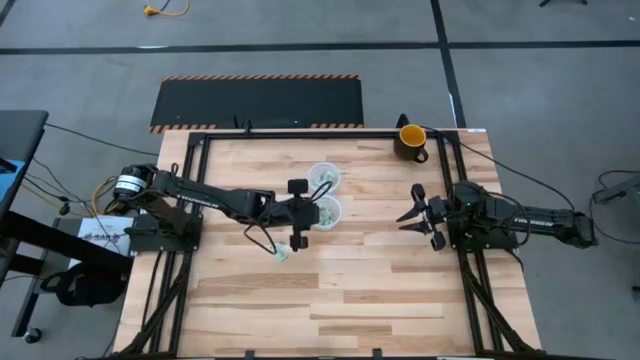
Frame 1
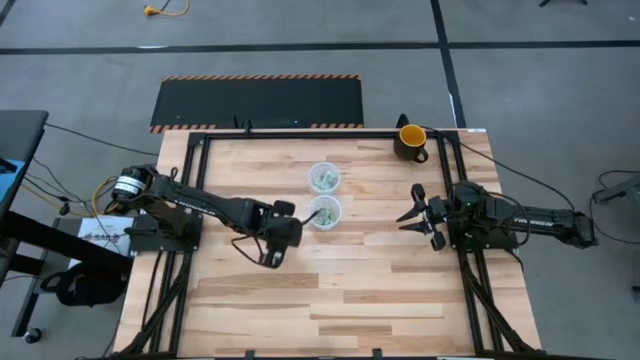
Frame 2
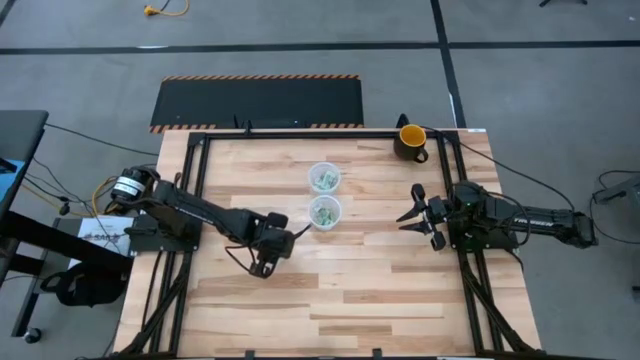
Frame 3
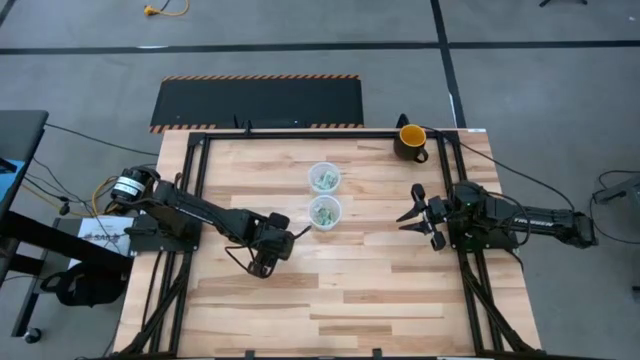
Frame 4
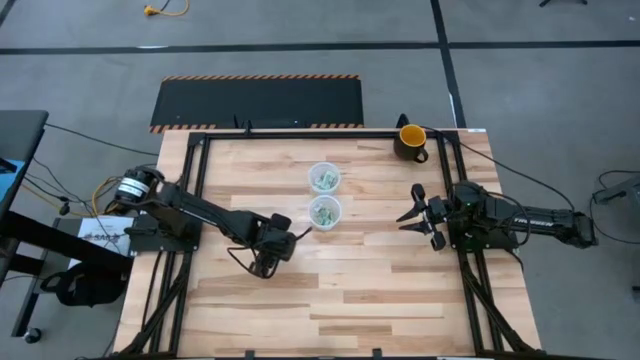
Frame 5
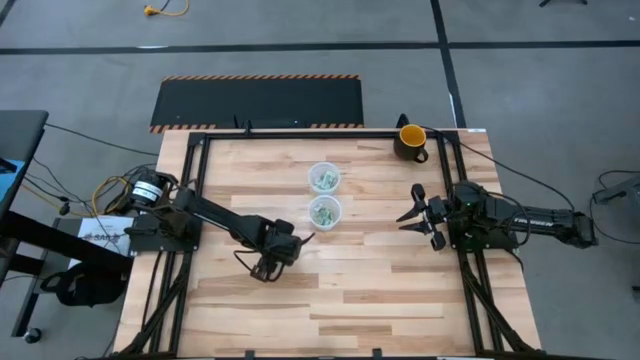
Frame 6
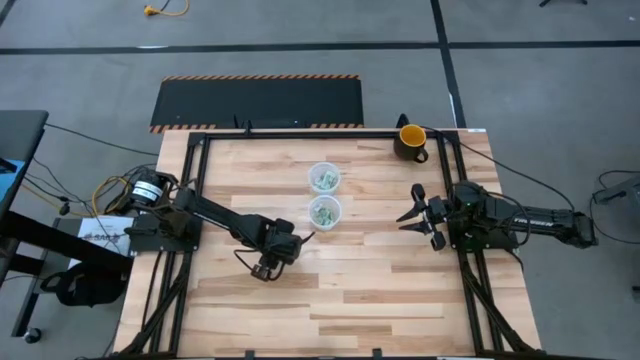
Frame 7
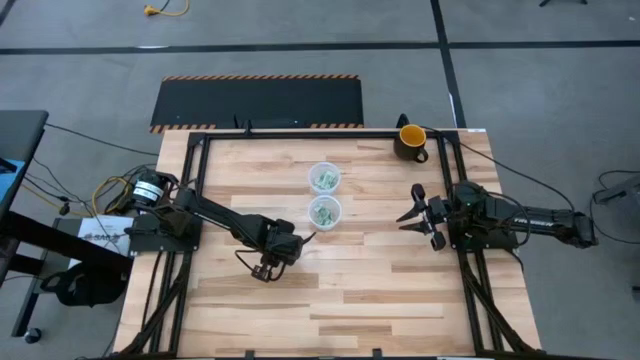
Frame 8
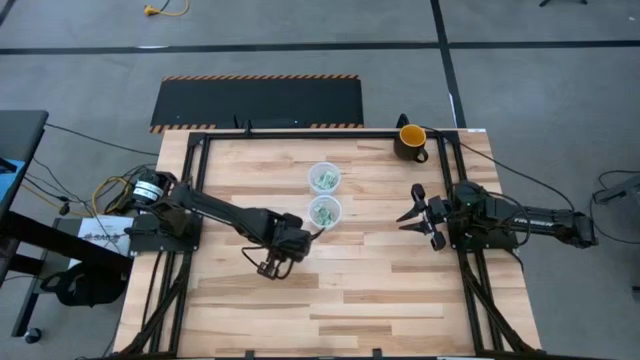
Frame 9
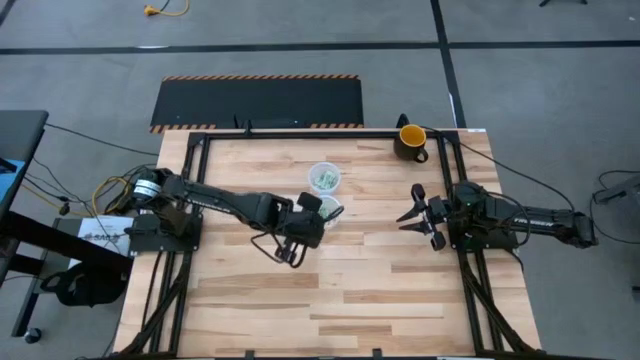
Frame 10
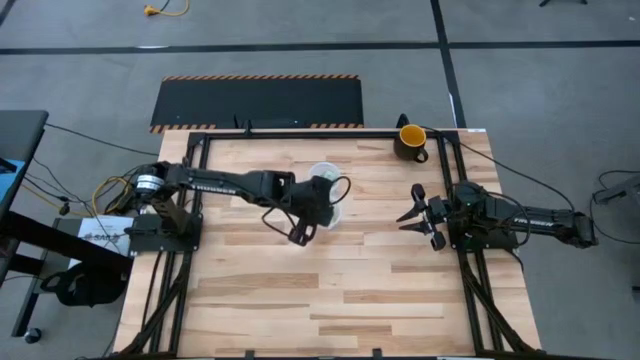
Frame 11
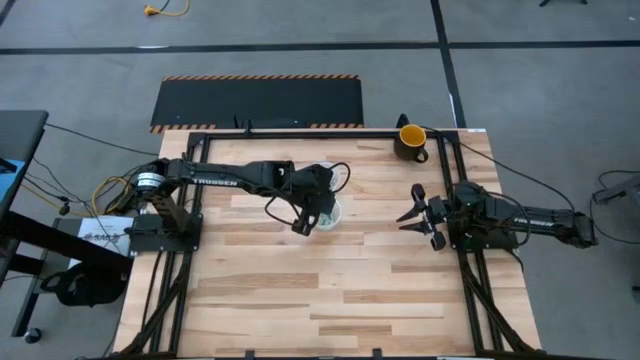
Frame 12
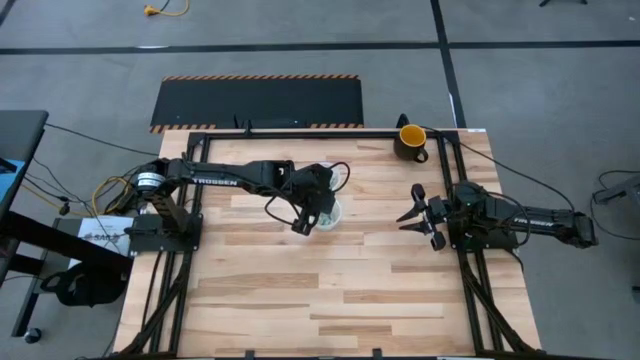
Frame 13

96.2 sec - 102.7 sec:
Task: Pick and place items into bin
Put the green stevia packet into the bottom transparent bin

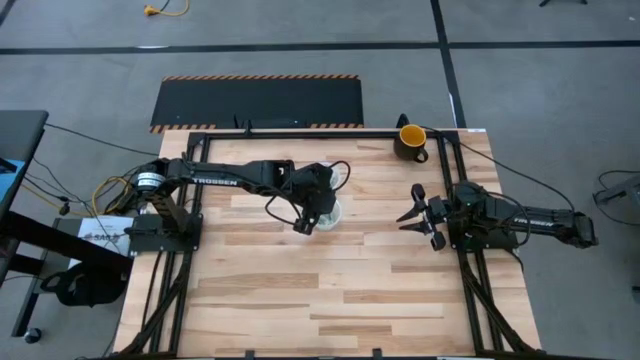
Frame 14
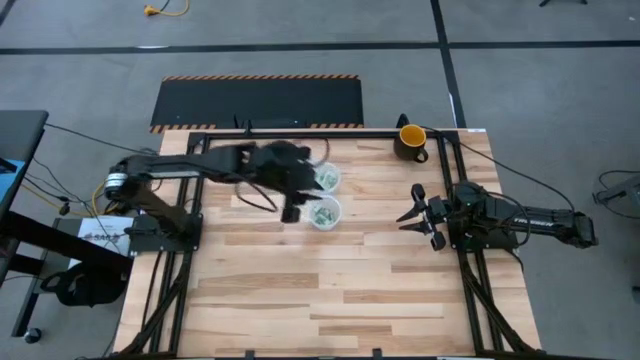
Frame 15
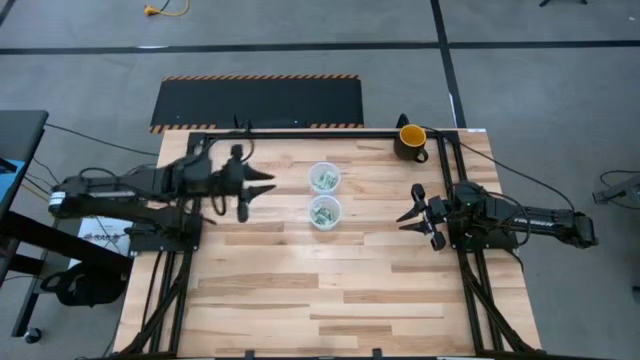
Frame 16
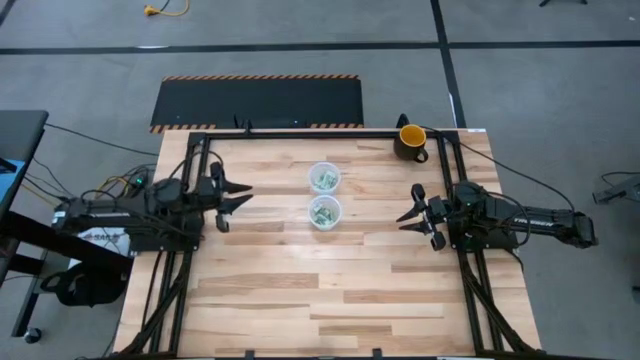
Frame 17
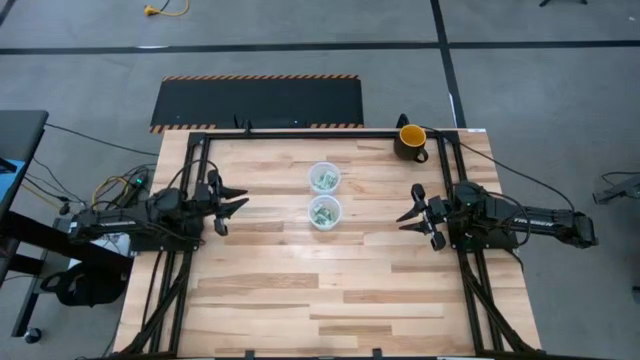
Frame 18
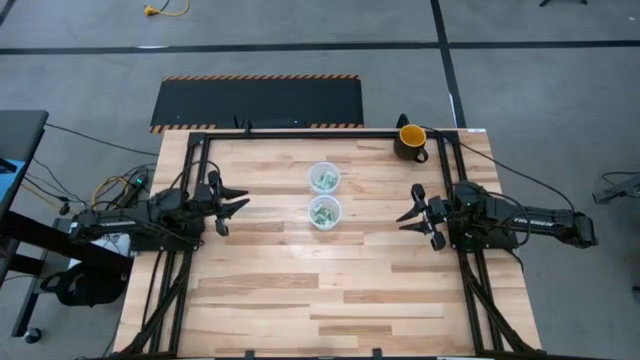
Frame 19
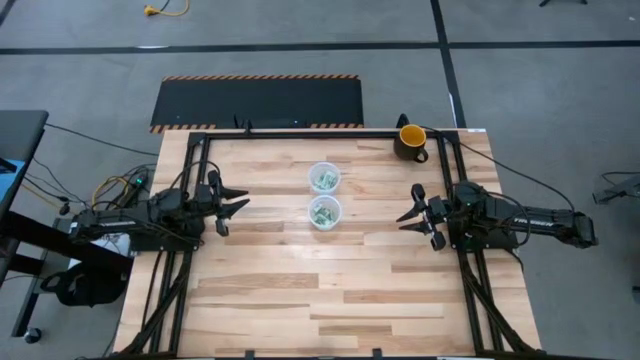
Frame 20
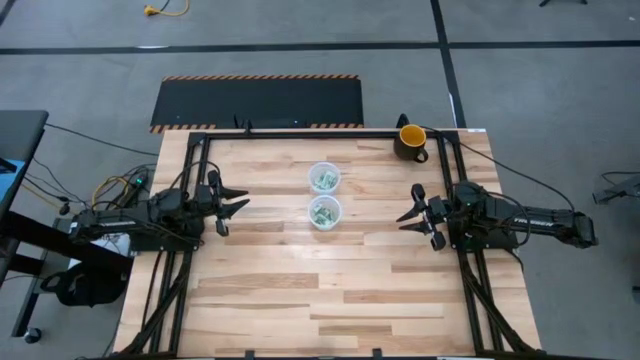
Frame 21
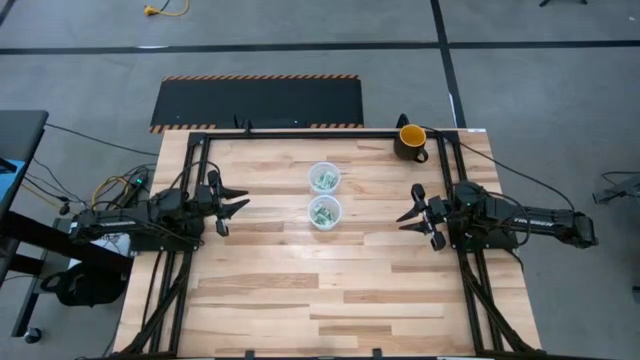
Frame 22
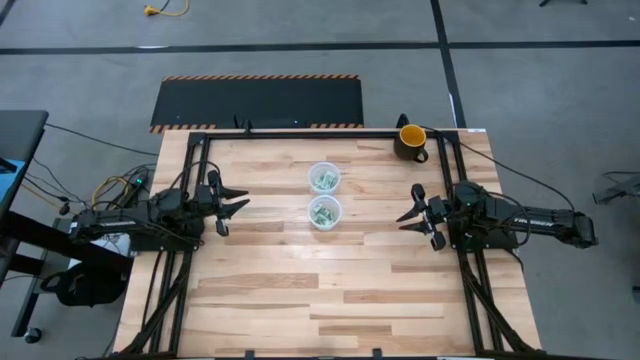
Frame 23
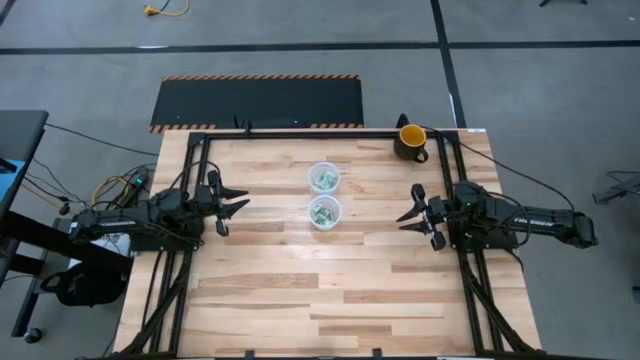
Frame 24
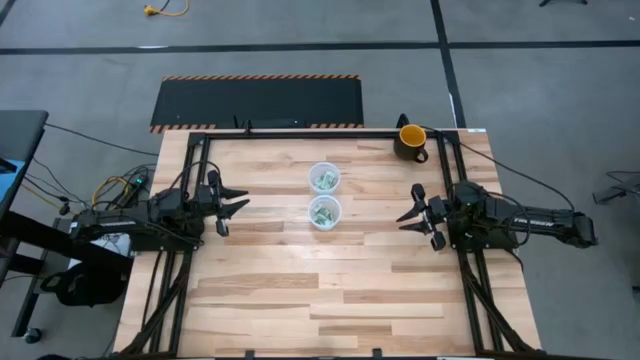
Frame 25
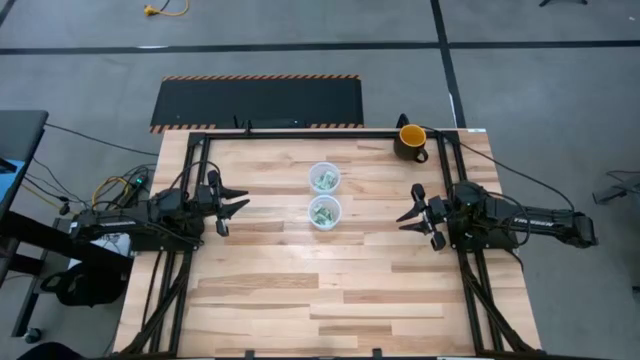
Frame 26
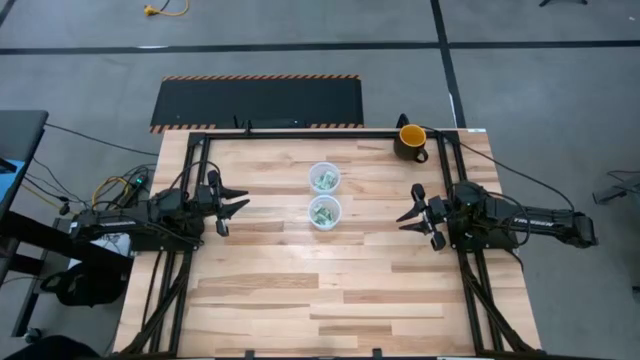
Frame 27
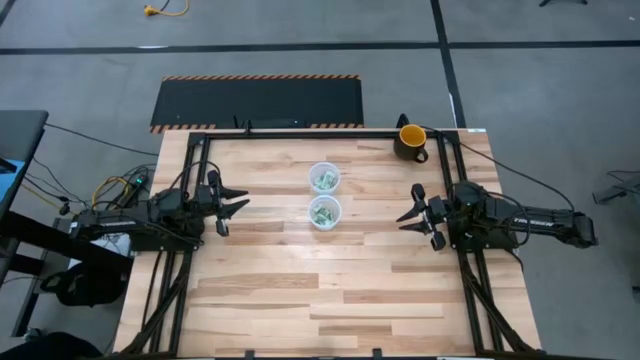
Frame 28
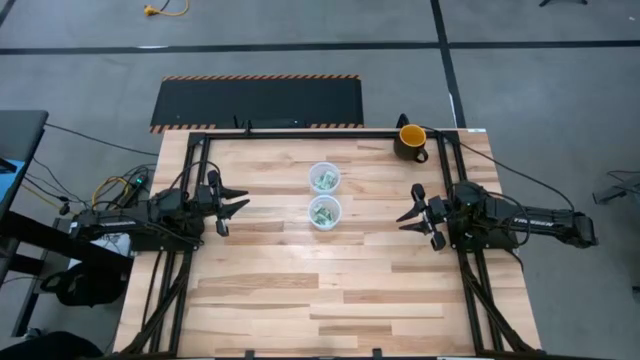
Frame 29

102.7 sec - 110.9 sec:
Return to Home Position

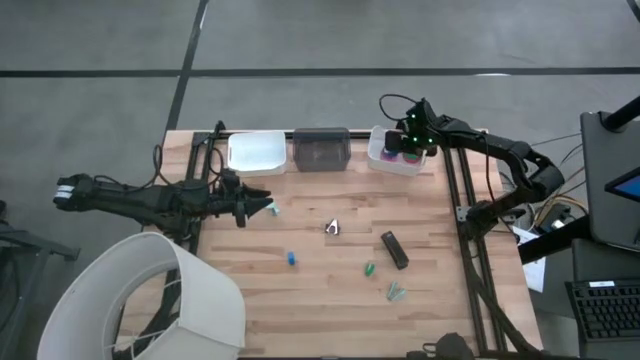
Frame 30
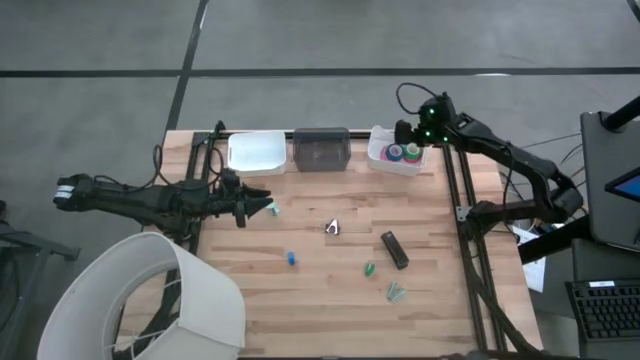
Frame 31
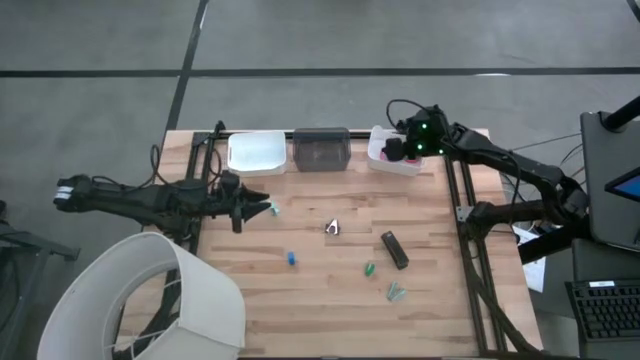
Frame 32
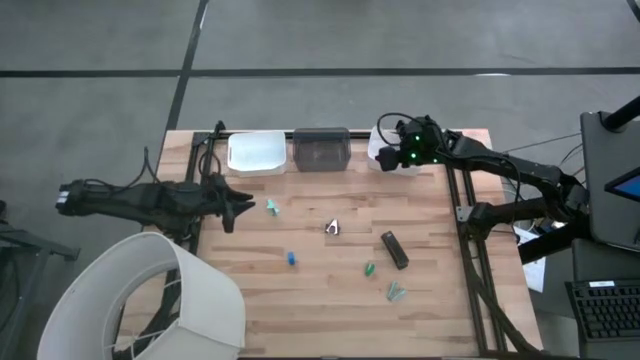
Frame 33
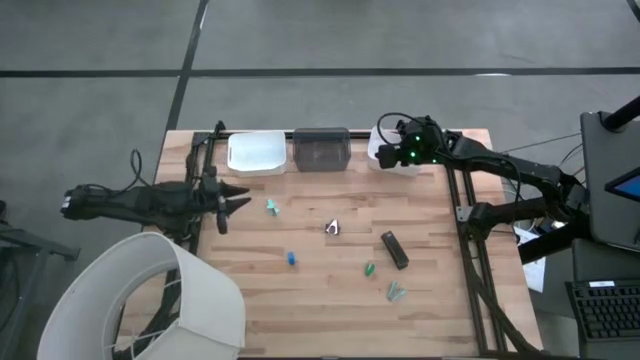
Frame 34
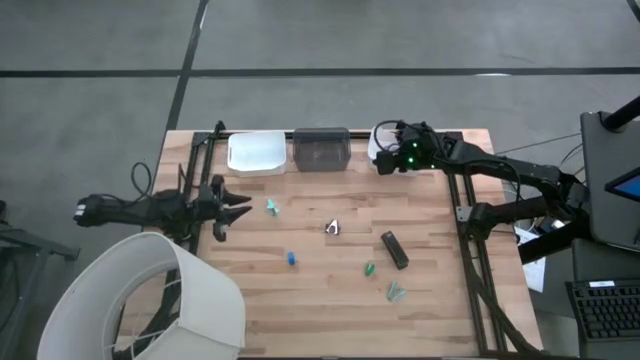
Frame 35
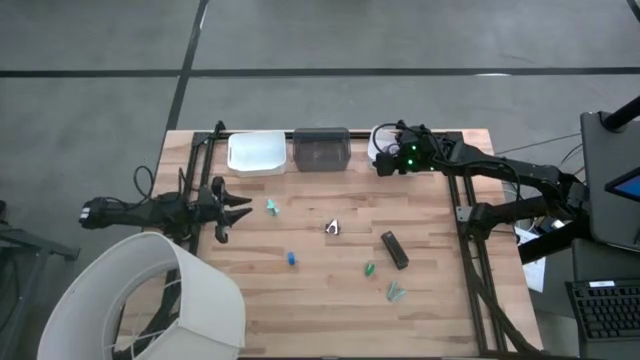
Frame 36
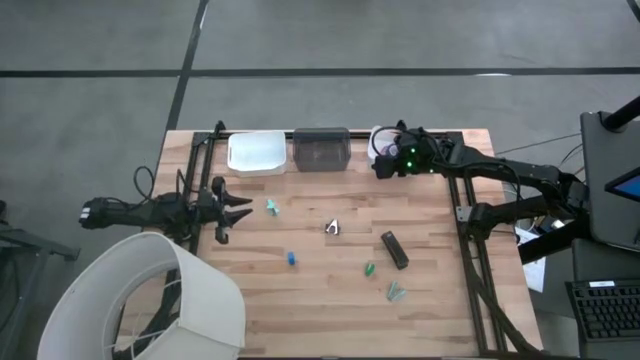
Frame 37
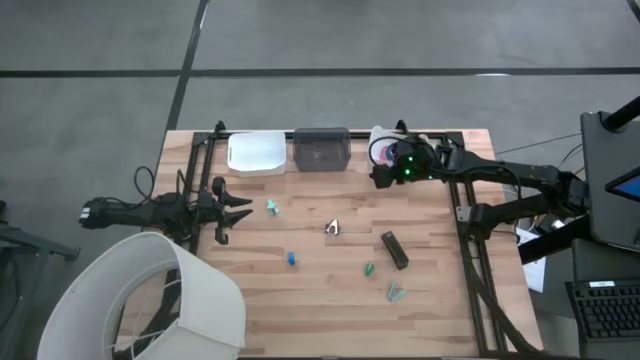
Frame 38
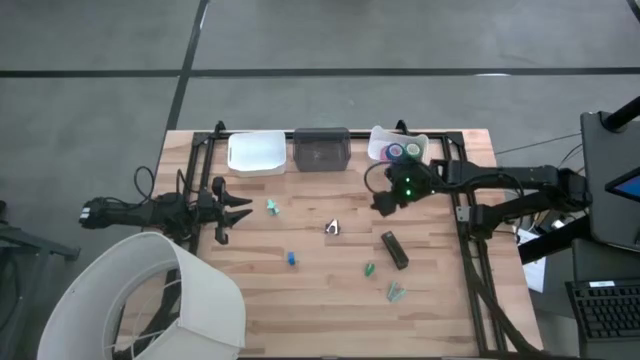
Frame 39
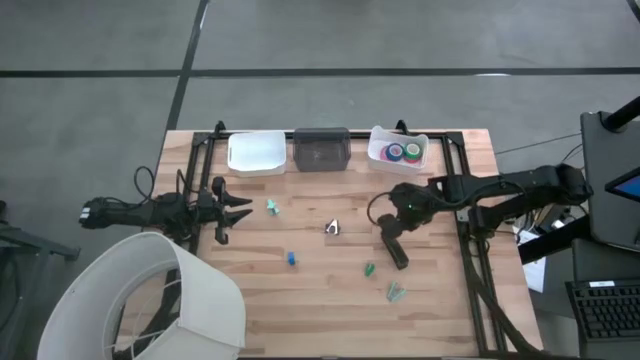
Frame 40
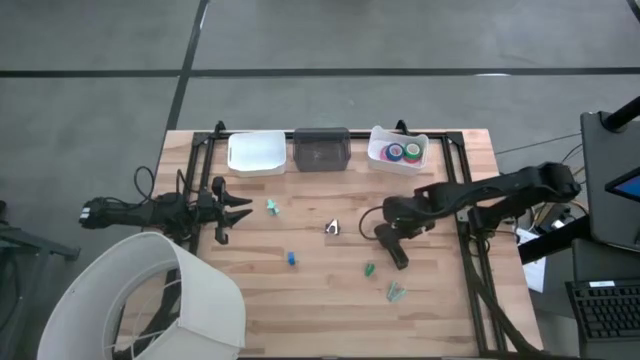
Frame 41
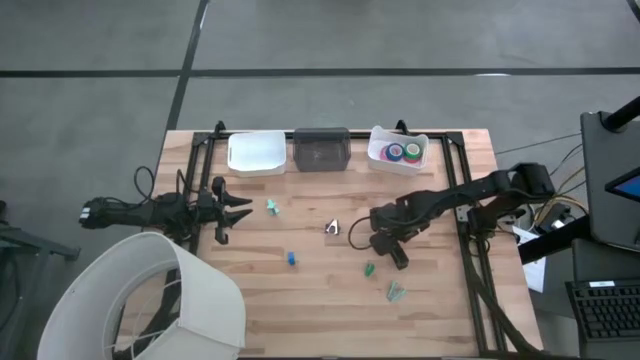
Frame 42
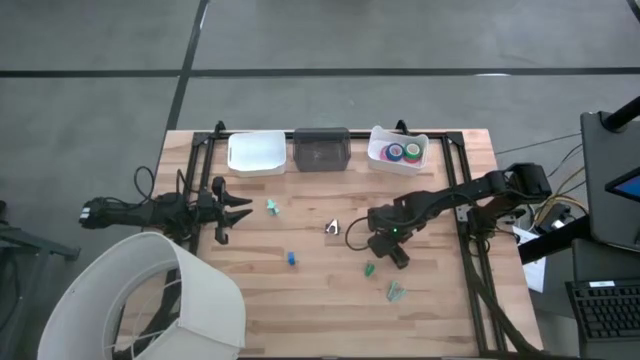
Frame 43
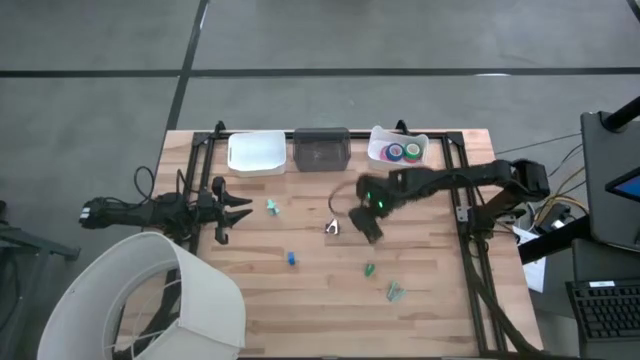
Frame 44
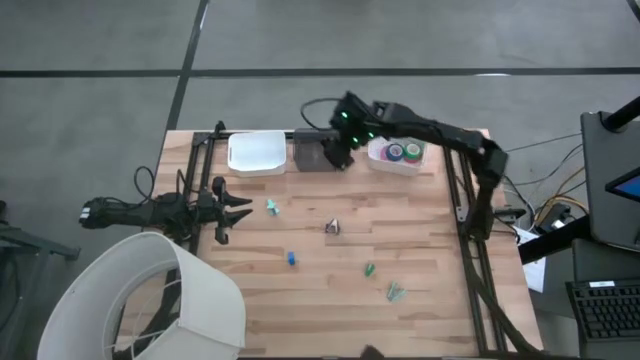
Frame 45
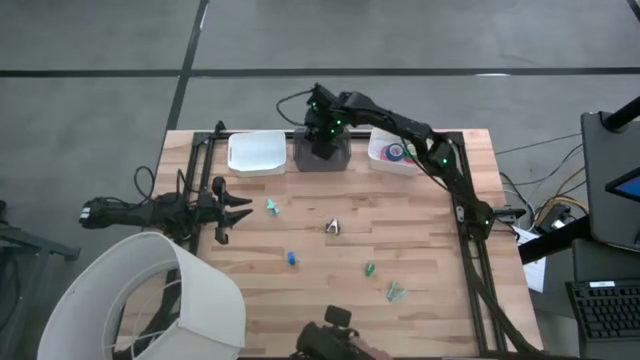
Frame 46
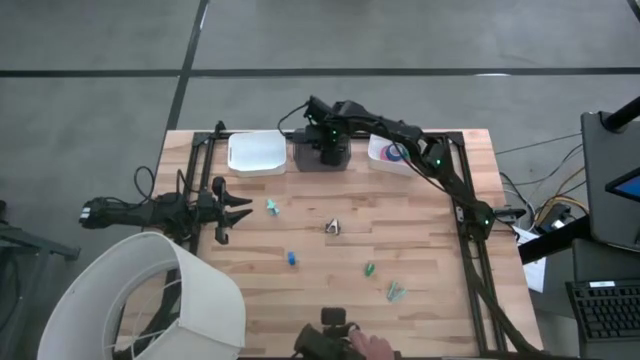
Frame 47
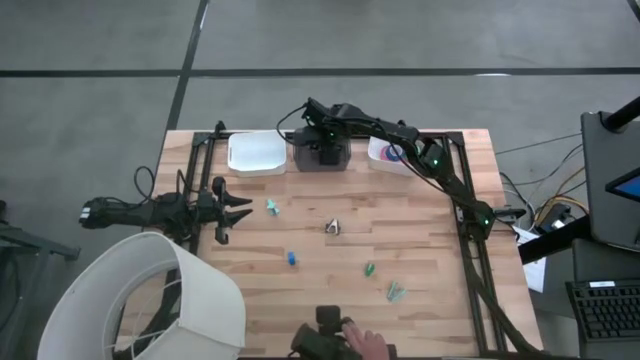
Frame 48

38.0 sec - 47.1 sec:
Task: Pick and place Stapler, Stapler remover, tape
Put the black stapler into the black bin
